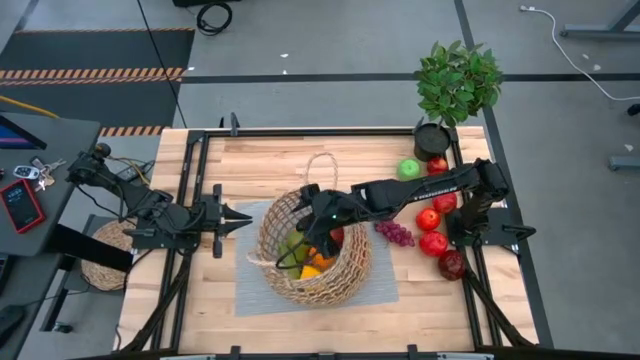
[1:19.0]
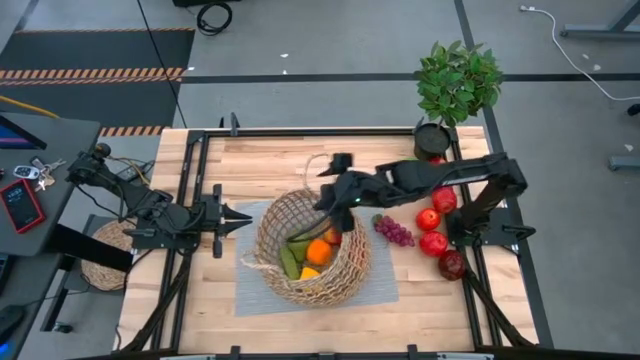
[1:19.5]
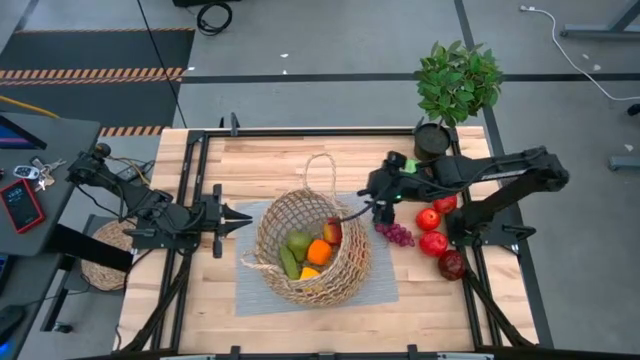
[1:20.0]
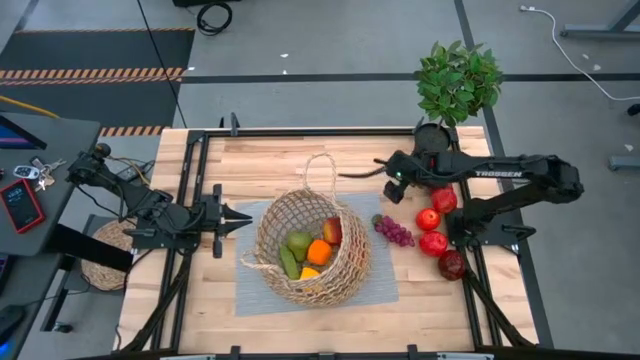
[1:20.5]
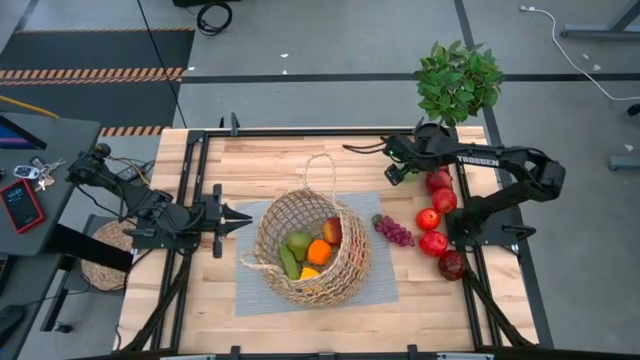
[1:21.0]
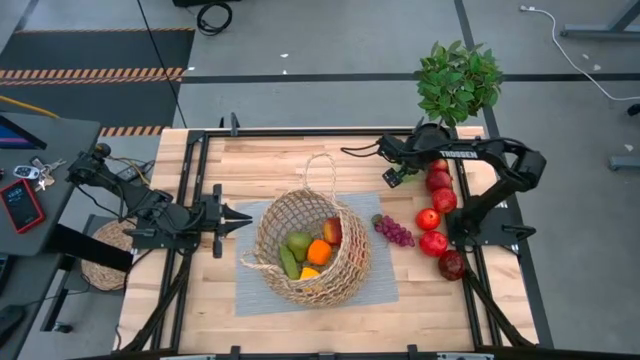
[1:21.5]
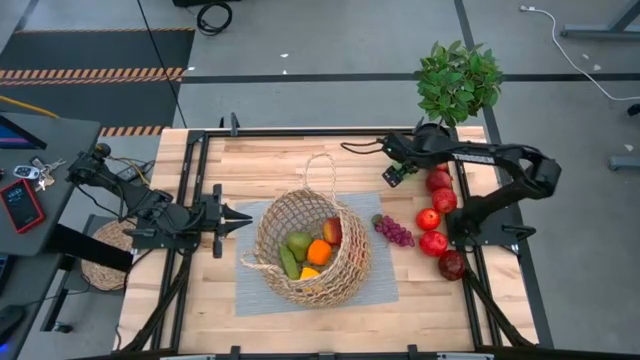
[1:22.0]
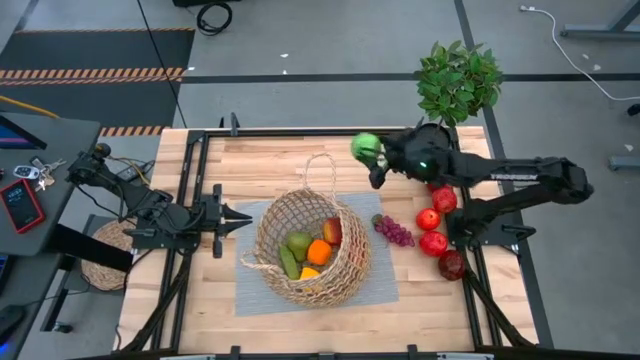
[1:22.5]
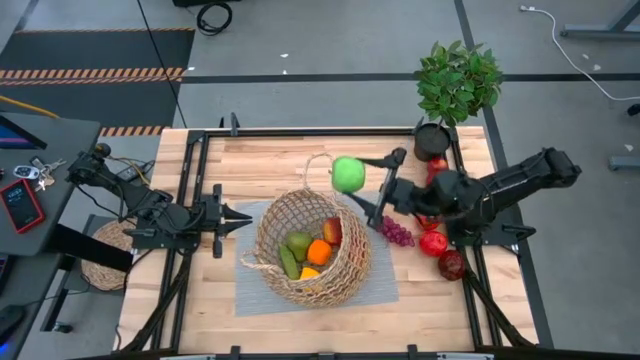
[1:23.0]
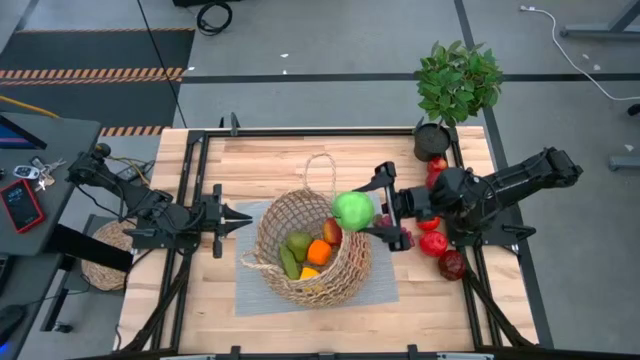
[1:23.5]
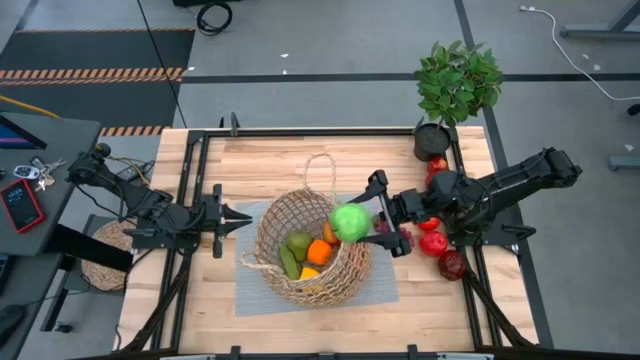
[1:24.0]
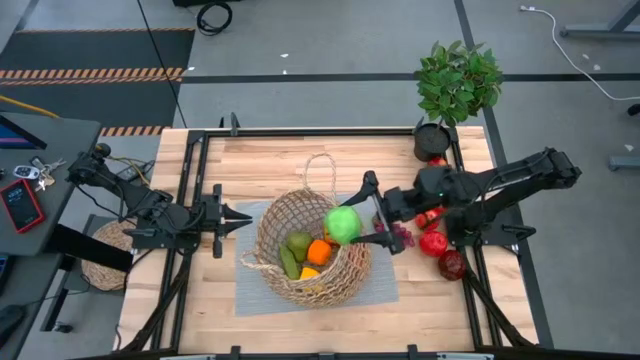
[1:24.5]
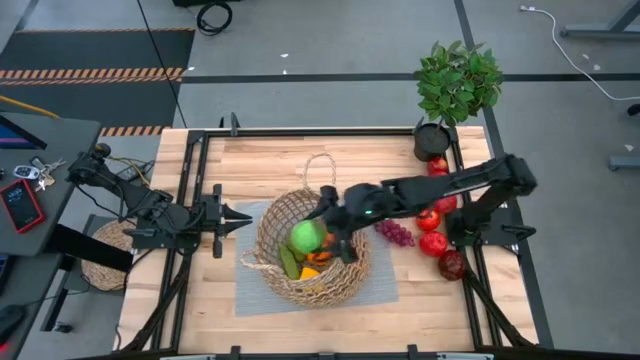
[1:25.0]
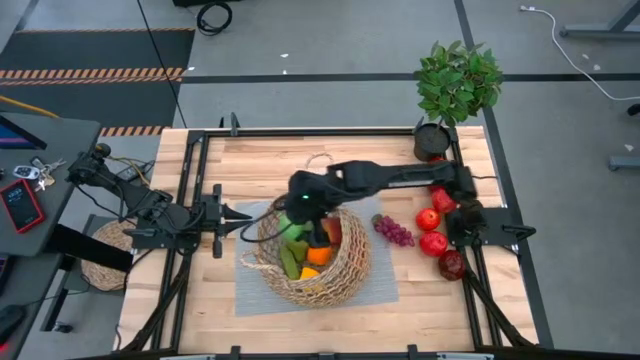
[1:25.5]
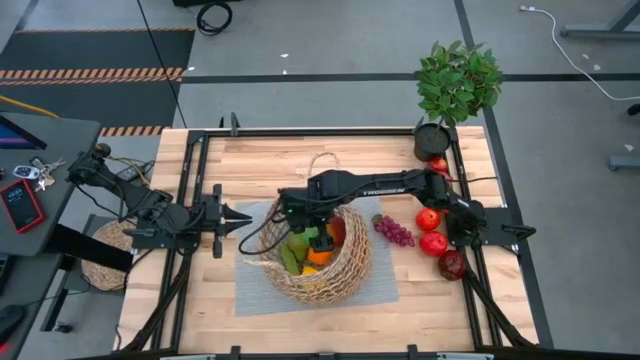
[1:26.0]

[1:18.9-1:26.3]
Task: Build produce basket
Put the green apple into the basket

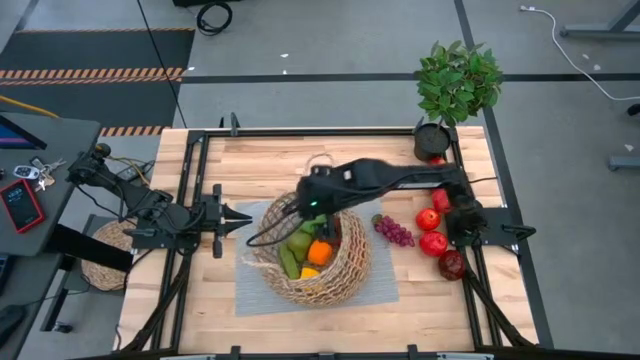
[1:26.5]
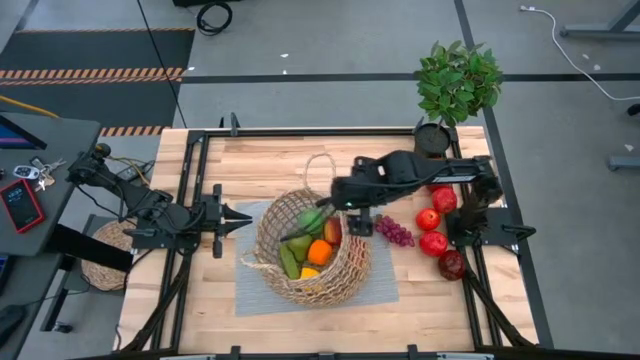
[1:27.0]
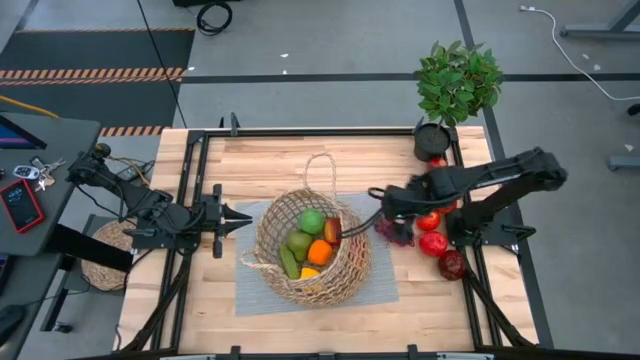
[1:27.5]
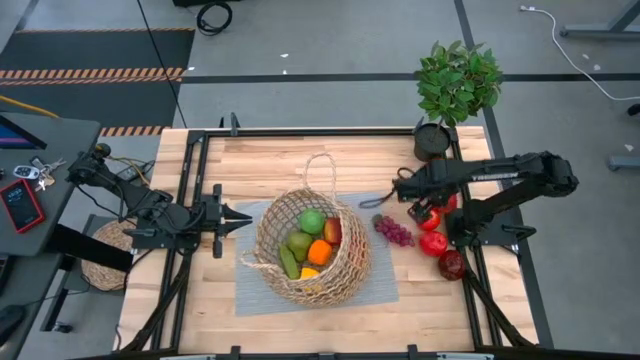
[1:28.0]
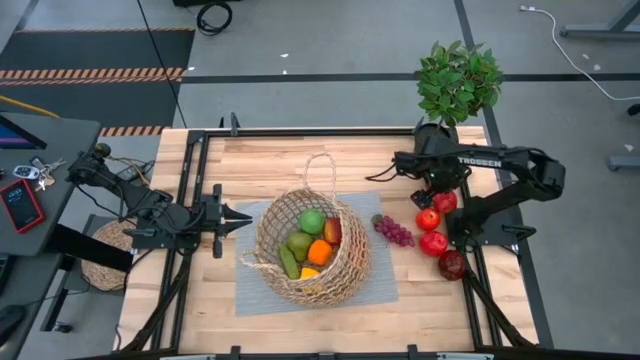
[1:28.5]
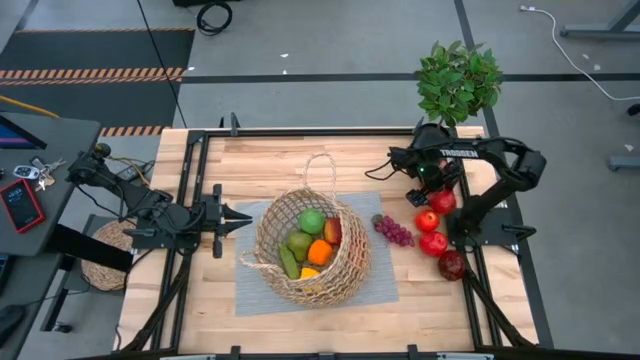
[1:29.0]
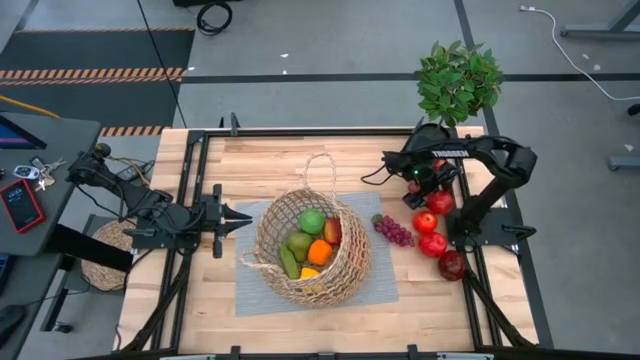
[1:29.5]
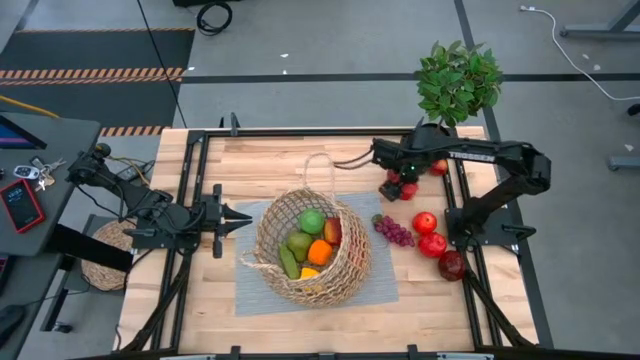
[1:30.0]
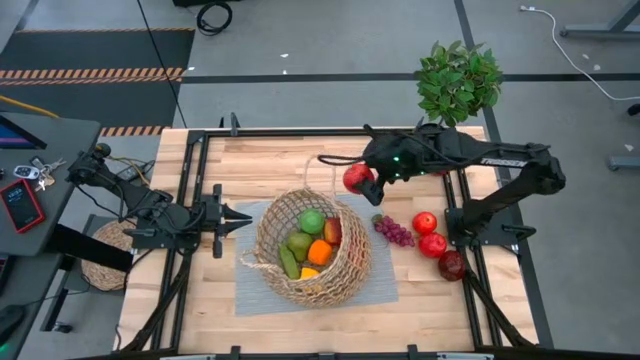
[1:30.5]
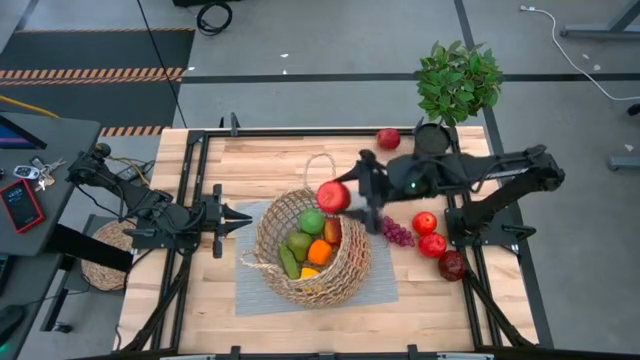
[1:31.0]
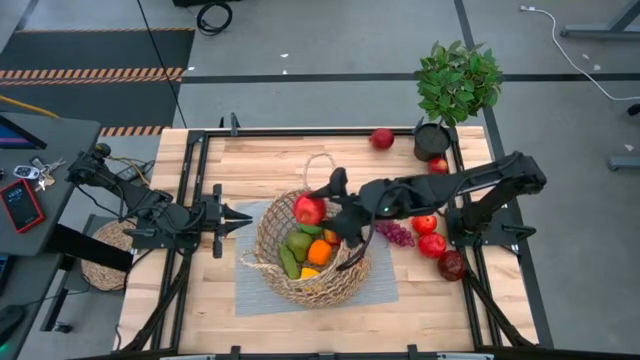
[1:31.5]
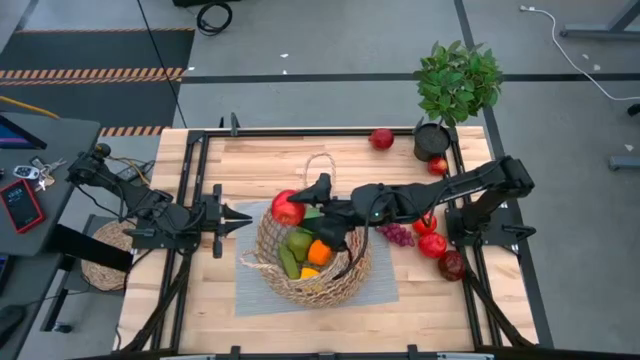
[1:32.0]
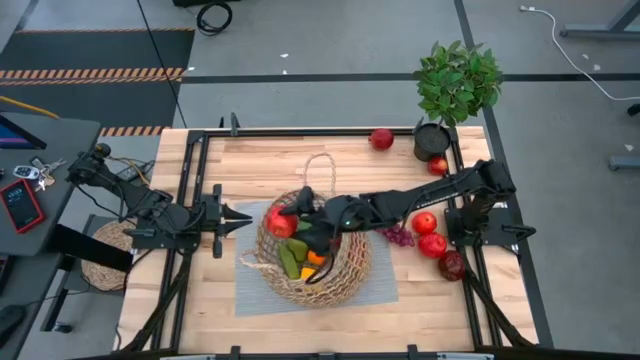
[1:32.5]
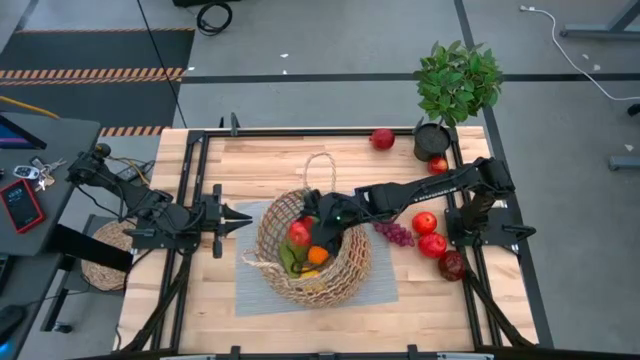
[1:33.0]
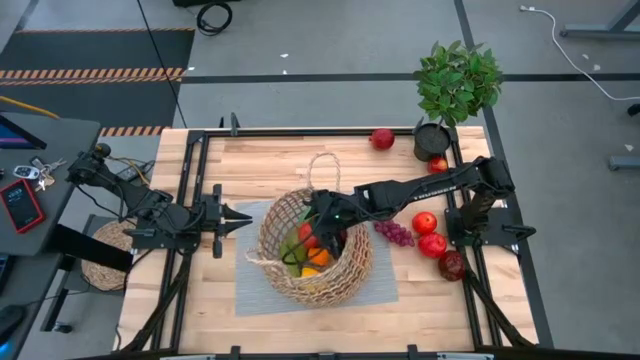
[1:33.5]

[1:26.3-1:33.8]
Put the red apple into the basket

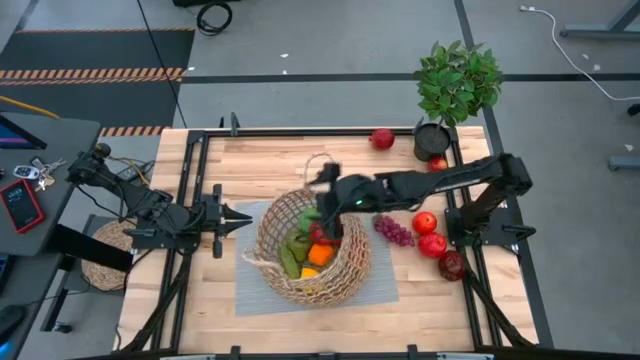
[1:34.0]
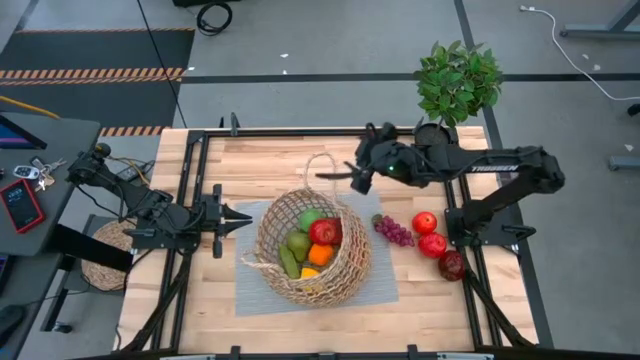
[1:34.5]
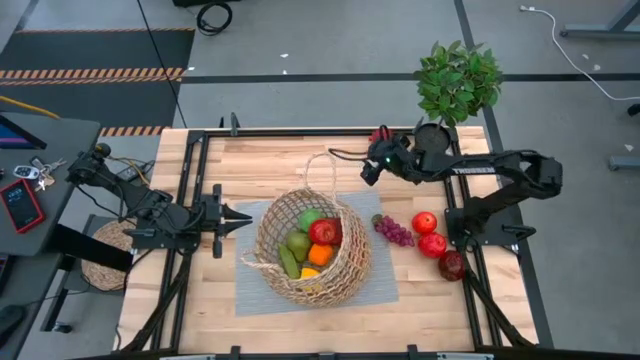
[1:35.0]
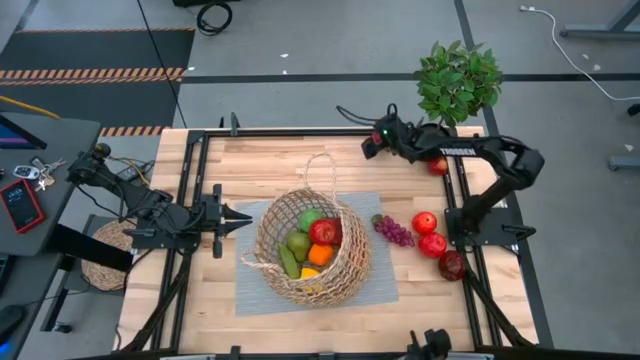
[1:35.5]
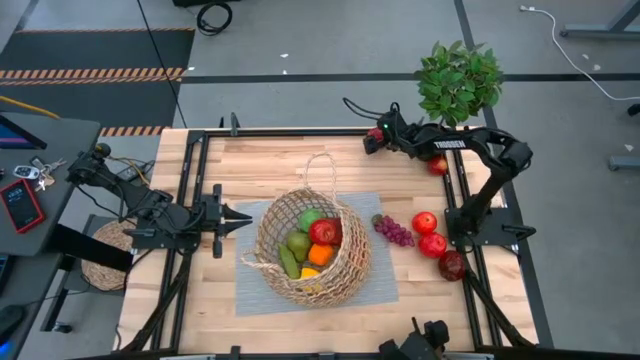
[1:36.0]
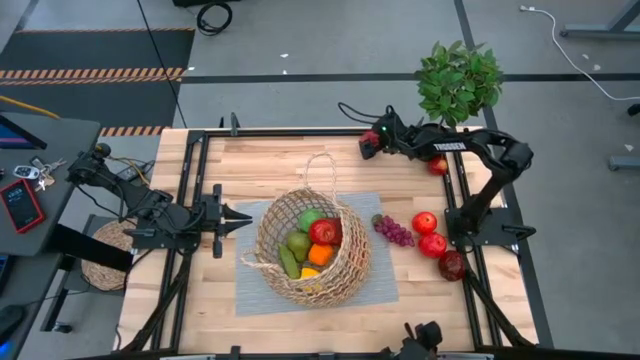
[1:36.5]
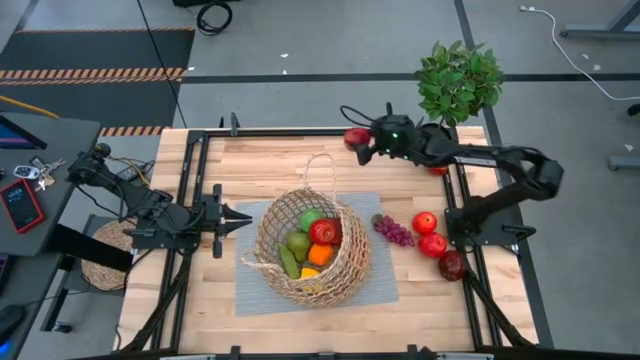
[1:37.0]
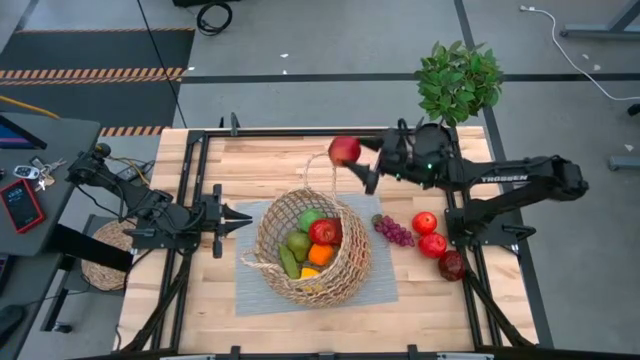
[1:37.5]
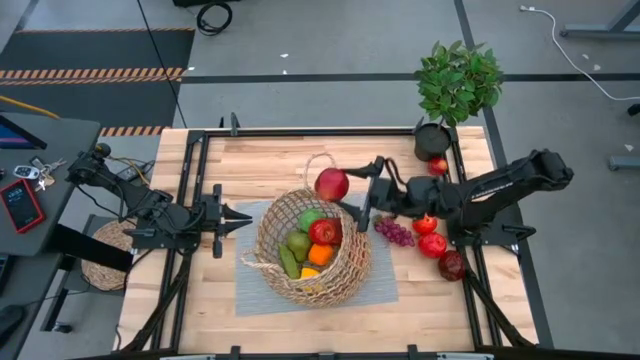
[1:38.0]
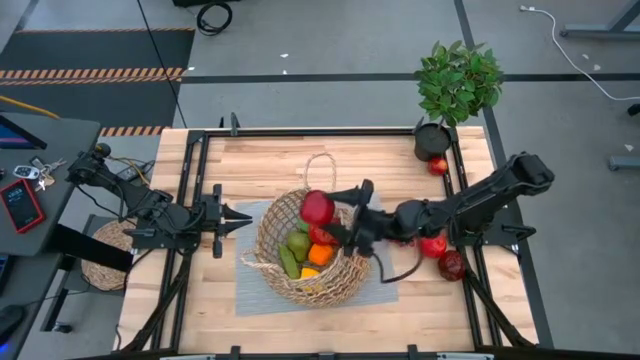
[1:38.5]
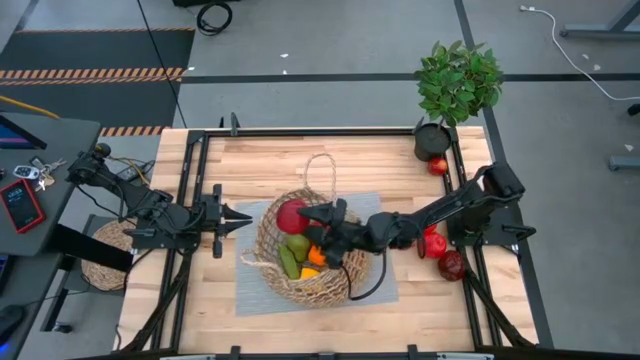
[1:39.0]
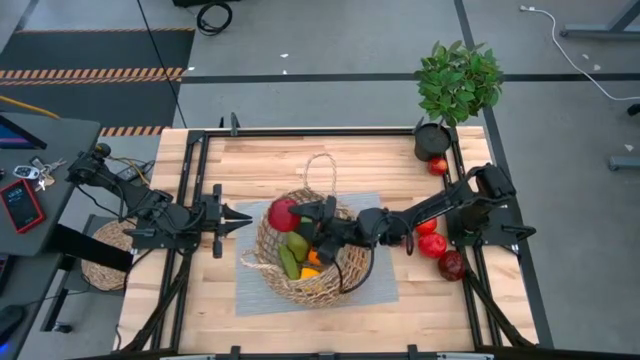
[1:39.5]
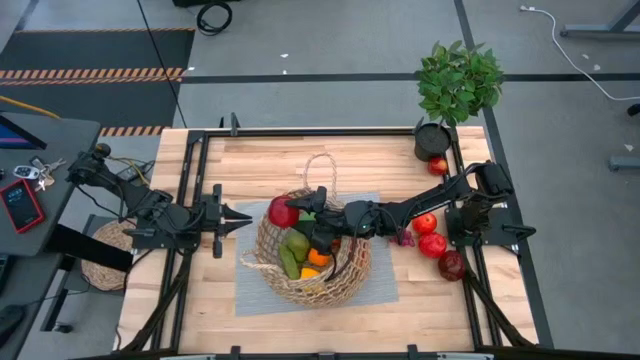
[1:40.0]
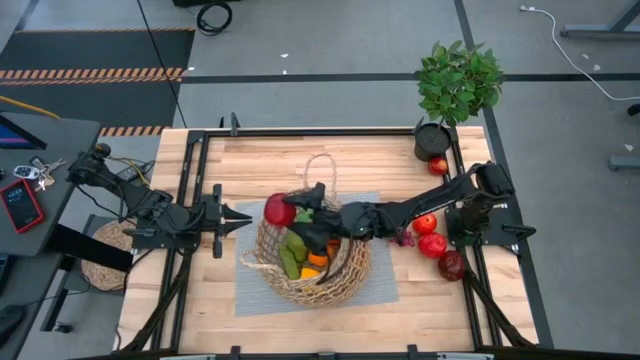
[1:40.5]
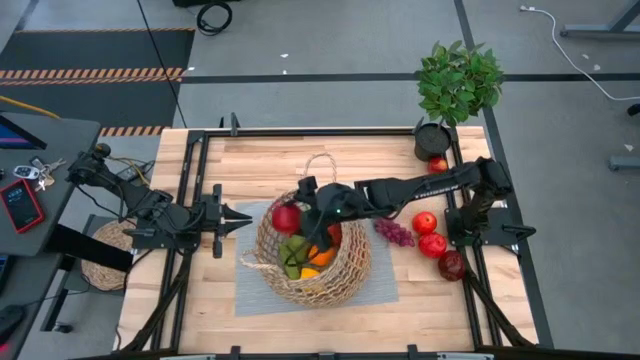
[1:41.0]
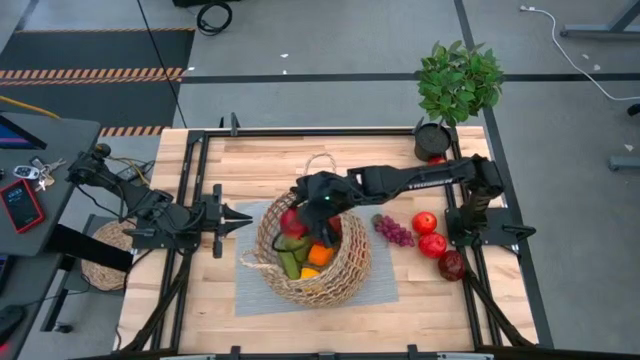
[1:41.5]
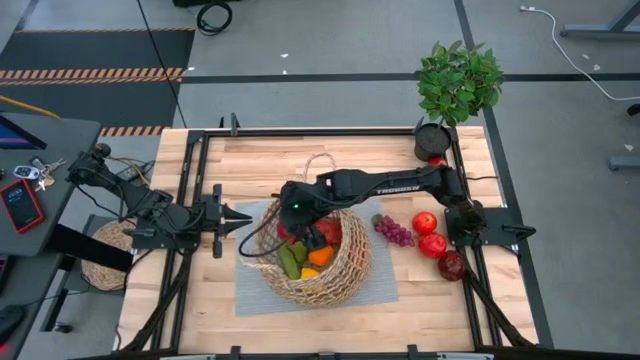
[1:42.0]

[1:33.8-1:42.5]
Put the pomegranate into the basket
